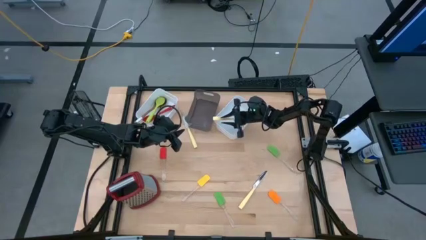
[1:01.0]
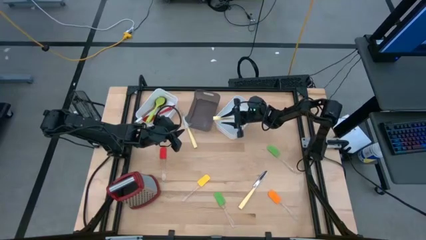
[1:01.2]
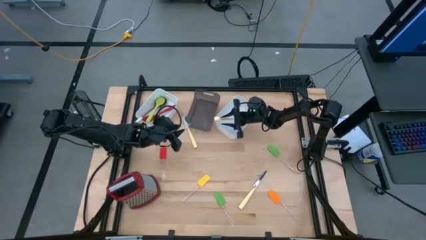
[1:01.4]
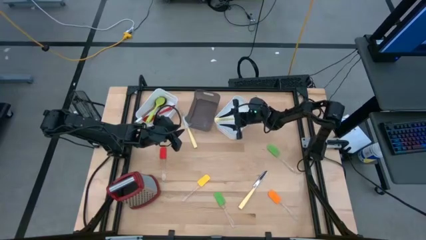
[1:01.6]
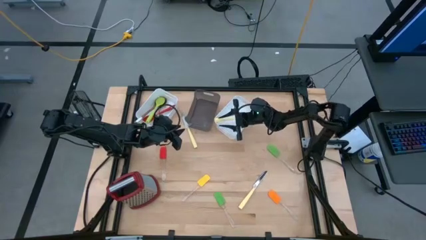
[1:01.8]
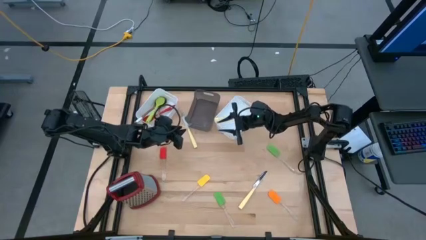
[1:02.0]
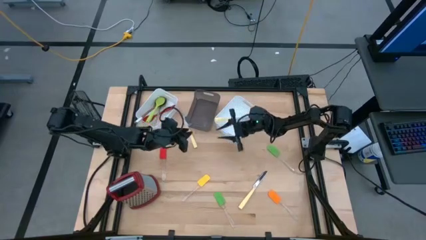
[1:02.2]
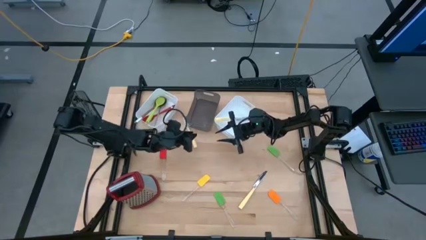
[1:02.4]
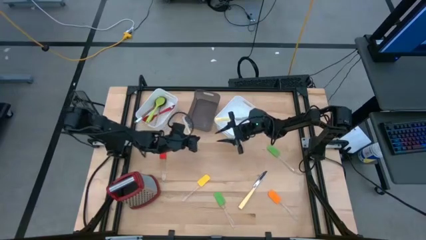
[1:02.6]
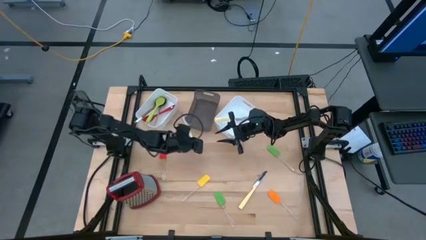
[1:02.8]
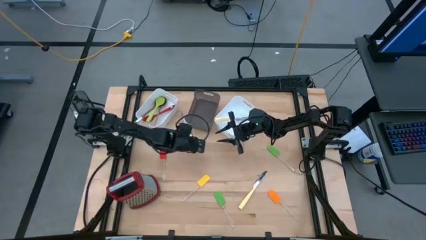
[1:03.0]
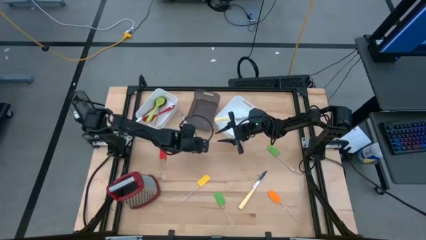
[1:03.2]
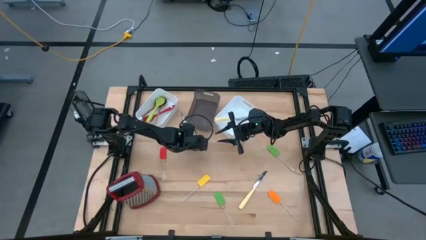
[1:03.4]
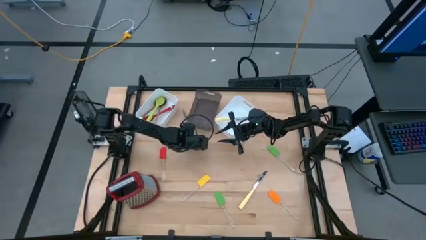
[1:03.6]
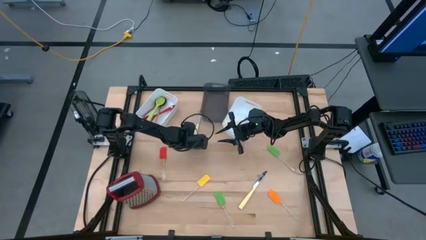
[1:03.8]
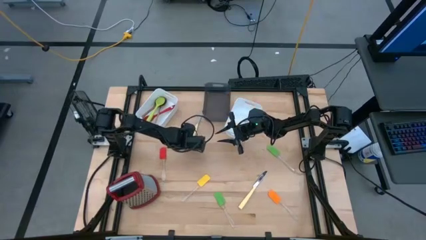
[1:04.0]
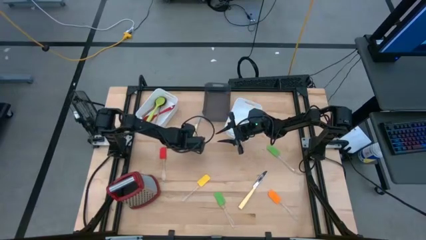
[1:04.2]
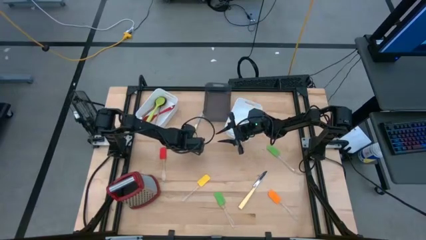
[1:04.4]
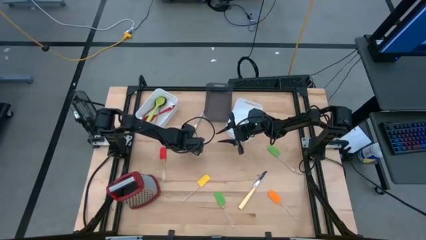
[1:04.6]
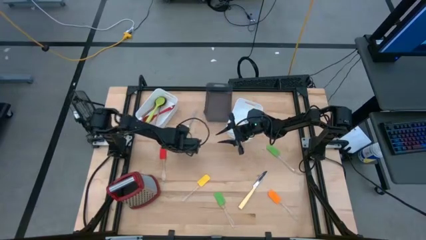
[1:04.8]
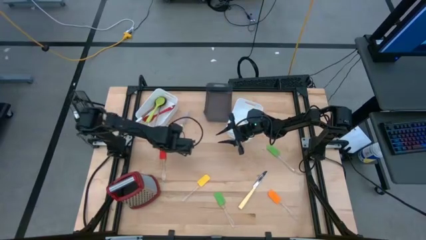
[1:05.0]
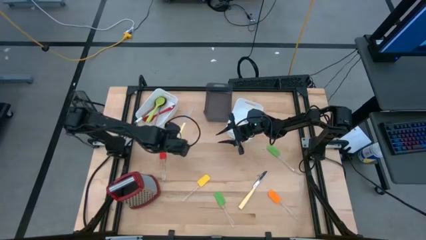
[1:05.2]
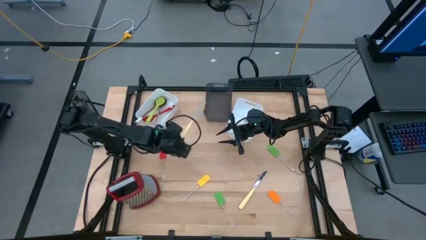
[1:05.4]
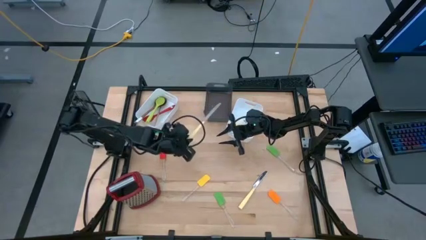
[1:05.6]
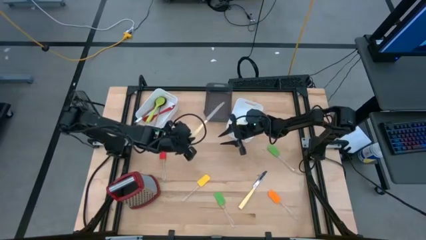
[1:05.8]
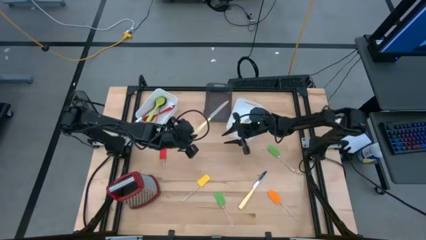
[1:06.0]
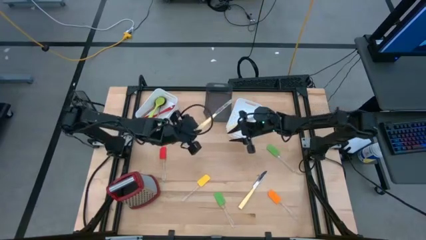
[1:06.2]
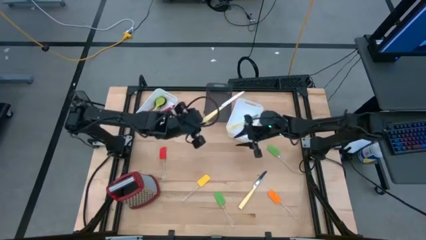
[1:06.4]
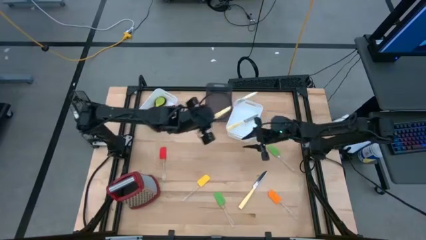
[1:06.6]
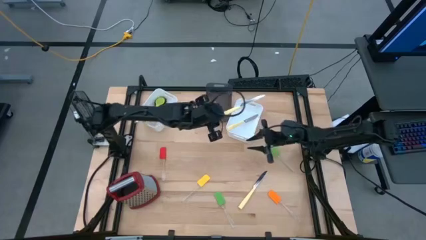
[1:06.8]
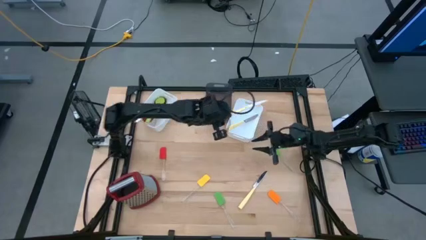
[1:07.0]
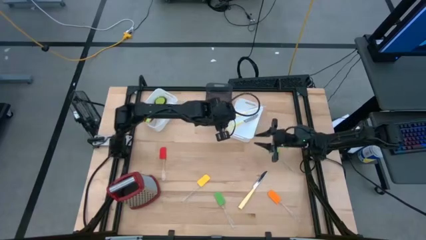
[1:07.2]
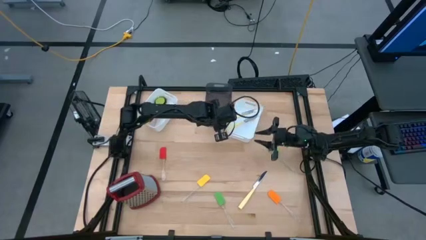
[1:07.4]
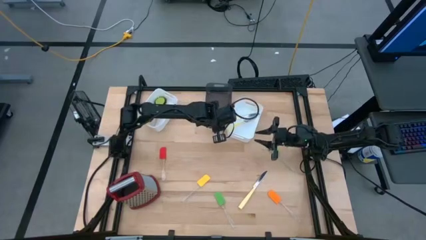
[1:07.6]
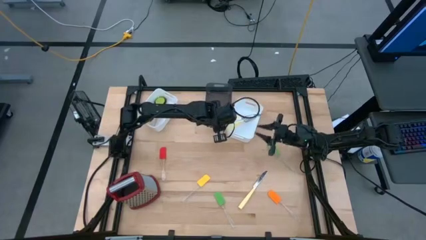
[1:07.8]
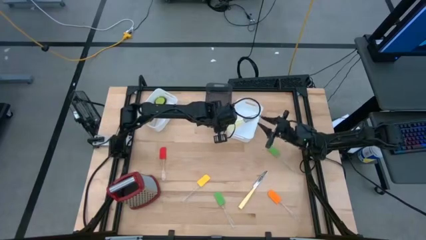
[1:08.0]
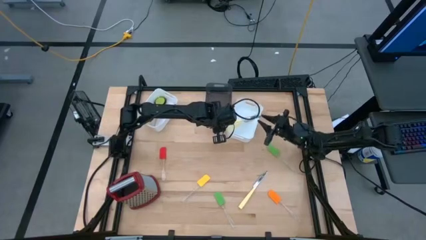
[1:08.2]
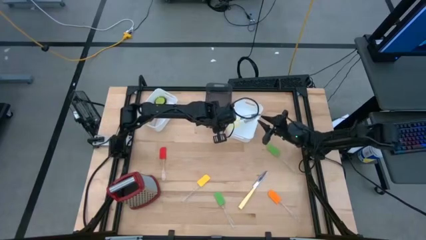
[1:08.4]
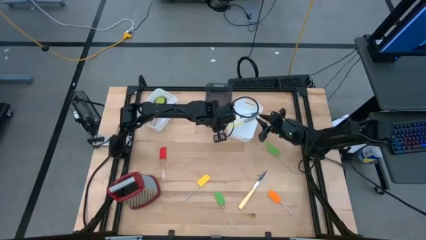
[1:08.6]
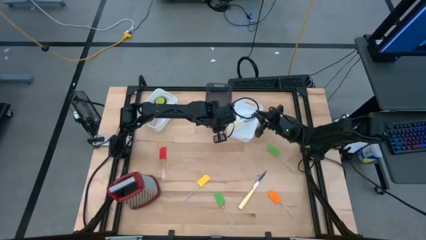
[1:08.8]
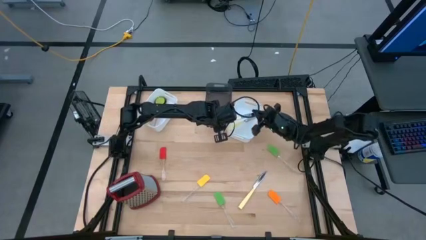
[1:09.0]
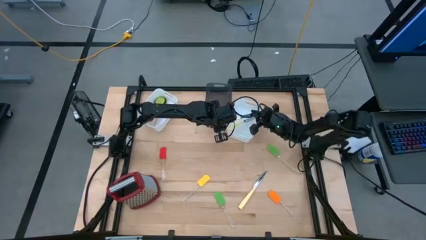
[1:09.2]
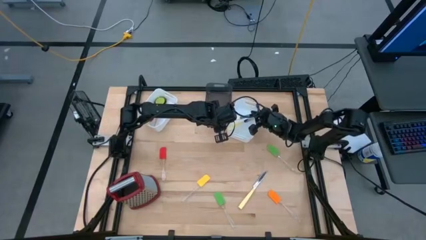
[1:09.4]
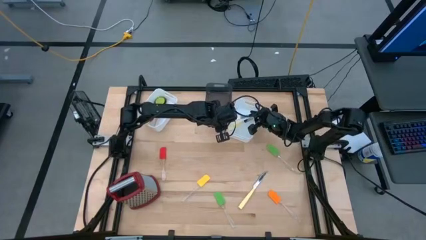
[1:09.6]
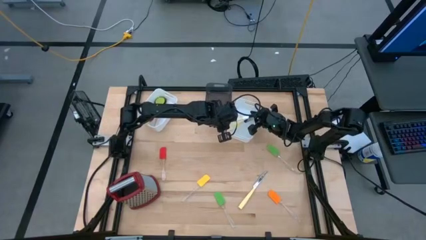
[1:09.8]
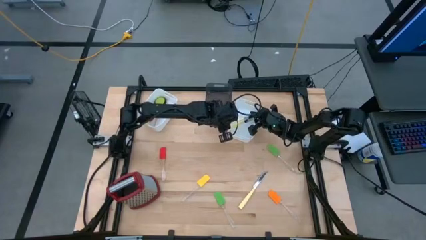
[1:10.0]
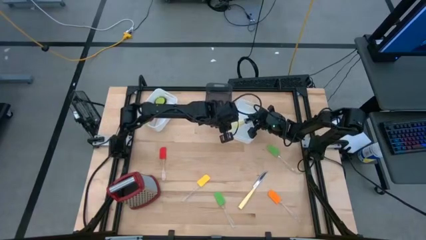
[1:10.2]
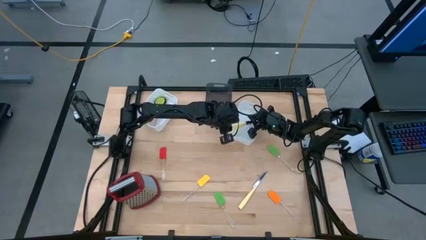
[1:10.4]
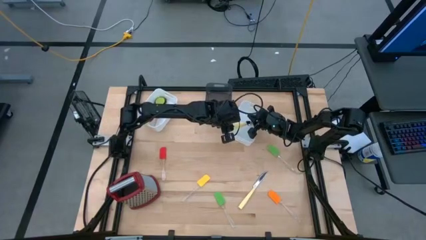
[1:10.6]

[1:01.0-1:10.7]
Task: Pick & Place Kitchen Items
Put the top yellow knife into the right white bin

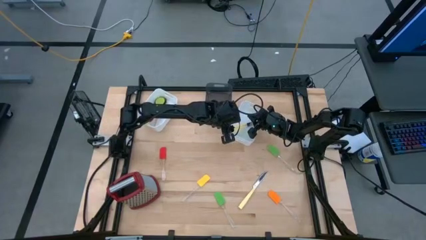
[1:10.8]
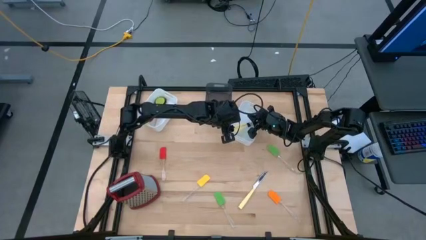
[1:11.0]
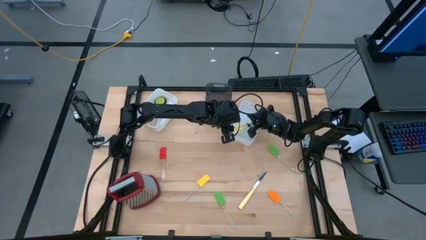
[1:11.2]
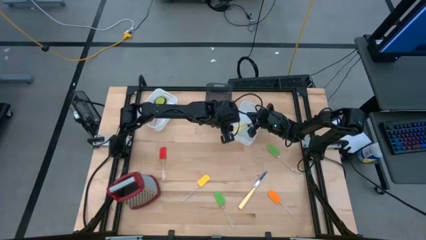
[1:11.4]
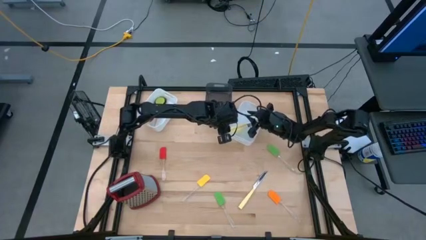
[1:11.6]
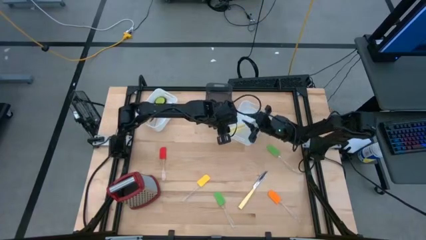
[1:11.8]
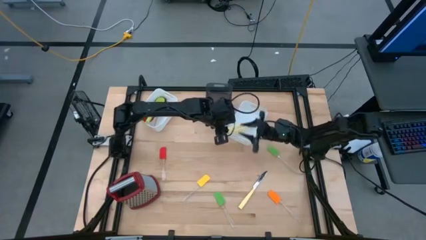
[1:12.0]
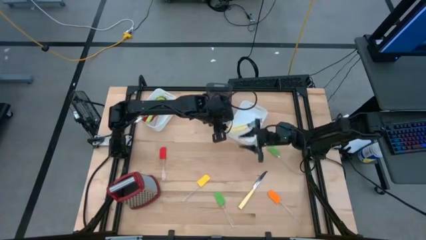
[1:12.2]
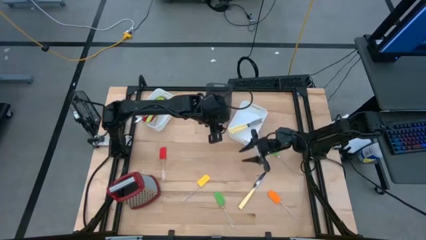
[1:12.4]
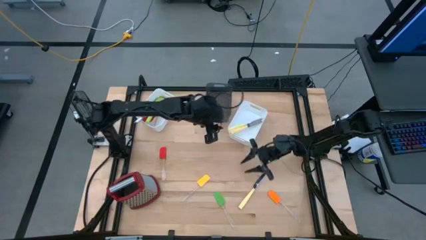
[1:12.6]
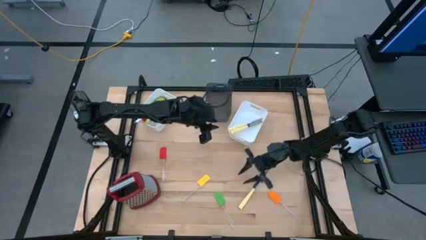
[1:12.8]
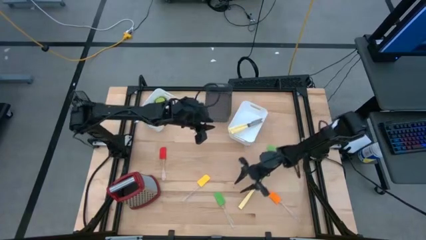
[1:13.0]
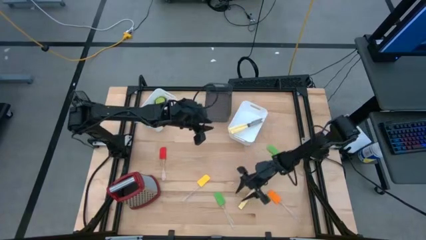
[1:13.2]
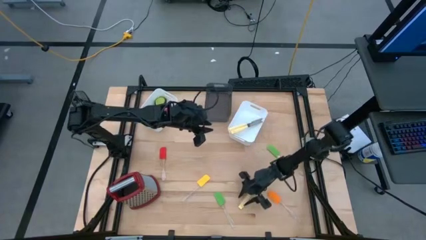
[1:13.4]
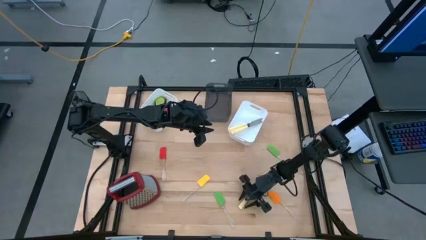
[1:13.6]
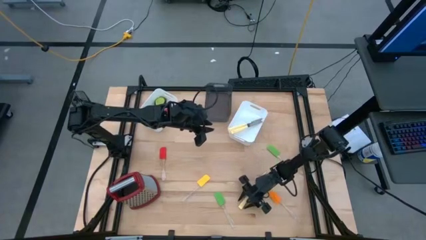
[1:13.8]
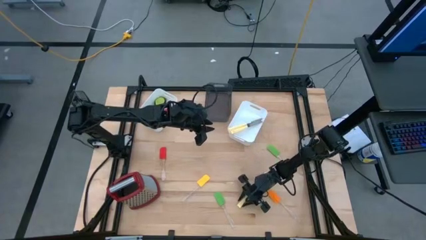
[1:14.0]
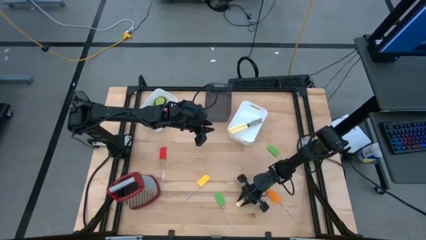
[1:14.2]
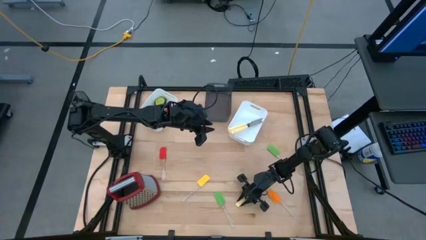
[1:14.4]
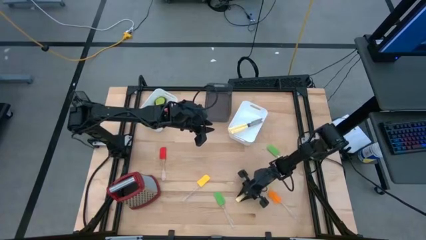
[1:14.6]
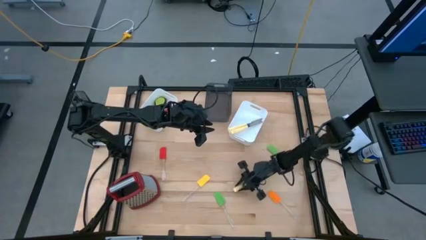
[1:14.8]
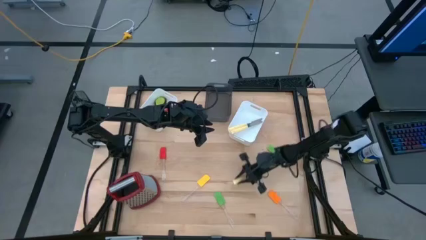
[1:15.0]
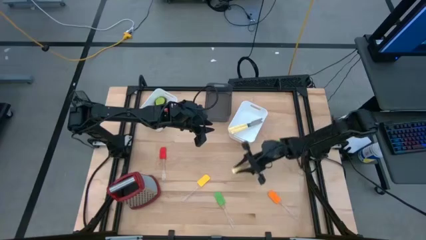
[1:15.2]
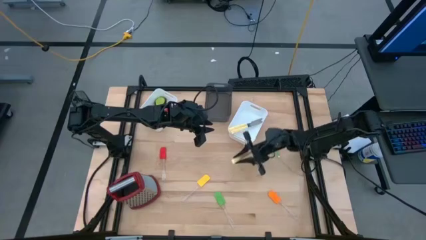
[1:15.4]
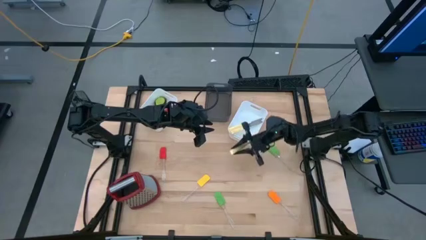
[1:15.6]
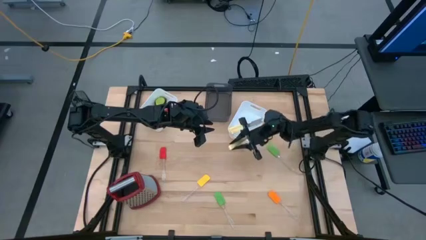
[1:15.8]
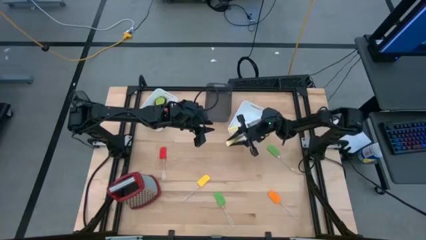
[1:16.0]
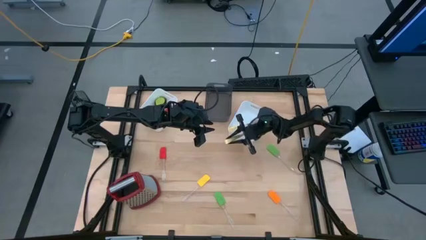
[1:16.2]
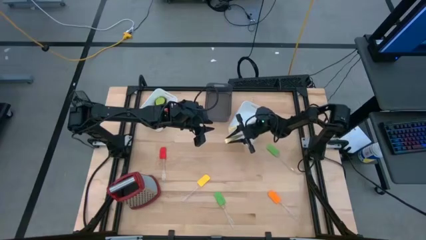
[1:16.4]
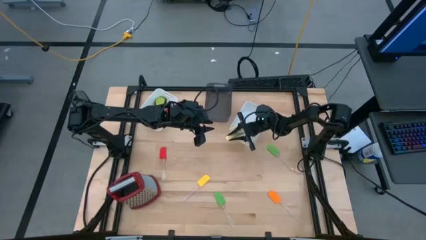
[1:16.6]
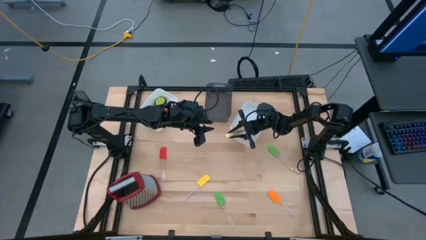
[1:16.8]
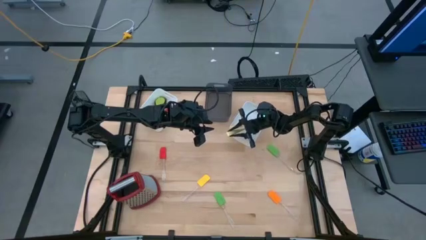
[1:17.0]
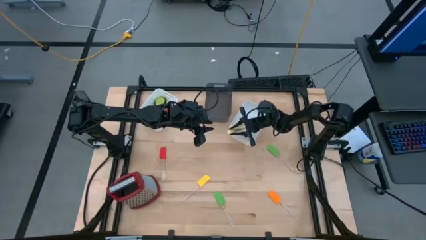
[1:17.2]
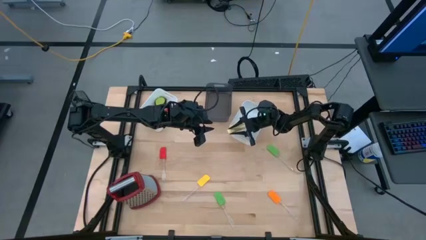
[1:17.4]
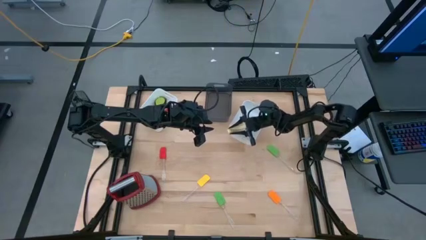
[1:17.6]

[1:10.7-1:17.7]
Put the yellow knife into the right white bin
